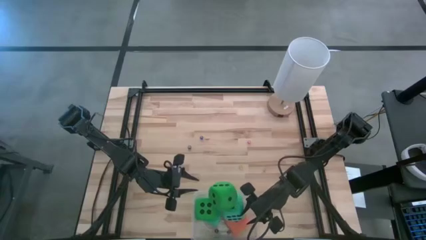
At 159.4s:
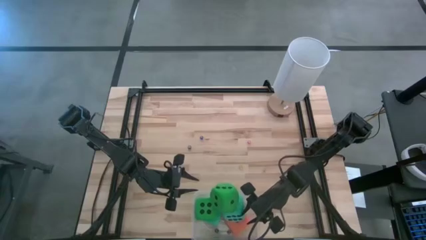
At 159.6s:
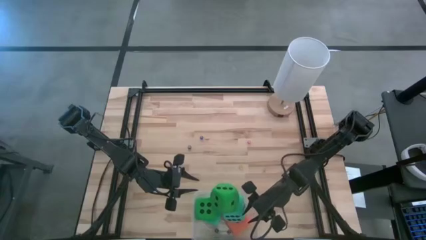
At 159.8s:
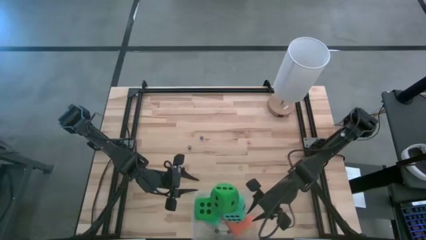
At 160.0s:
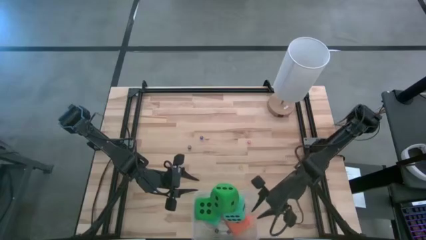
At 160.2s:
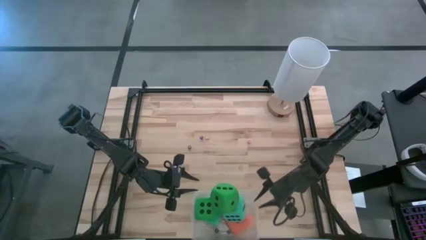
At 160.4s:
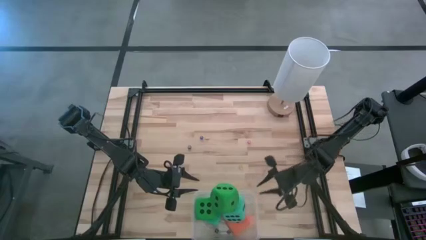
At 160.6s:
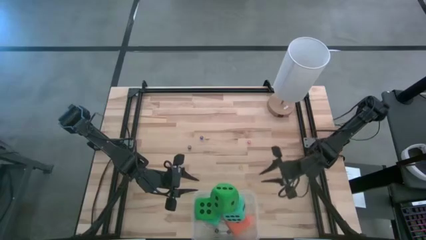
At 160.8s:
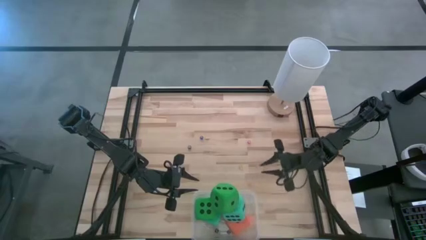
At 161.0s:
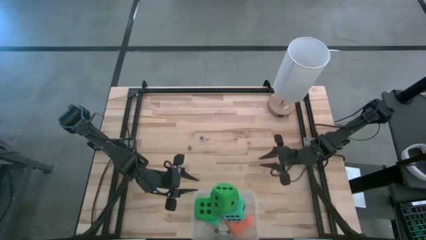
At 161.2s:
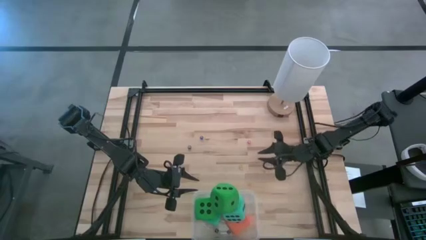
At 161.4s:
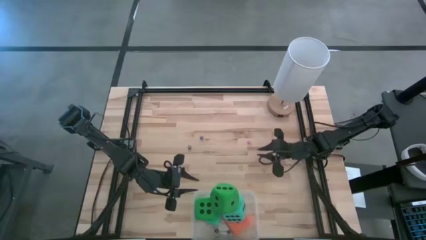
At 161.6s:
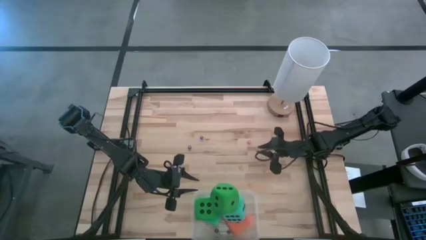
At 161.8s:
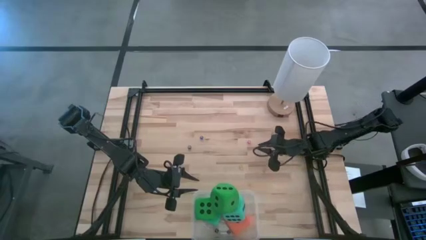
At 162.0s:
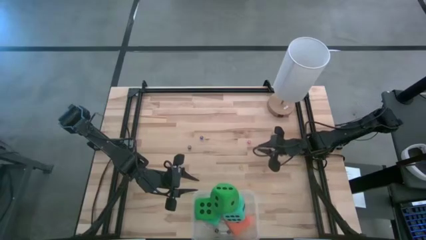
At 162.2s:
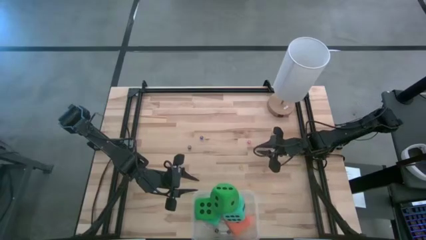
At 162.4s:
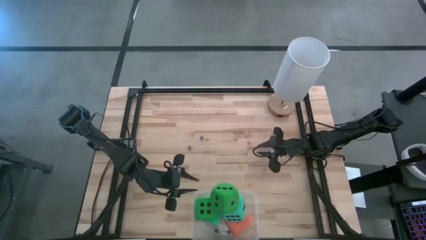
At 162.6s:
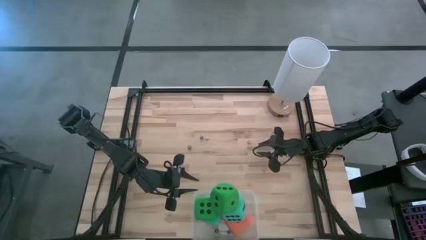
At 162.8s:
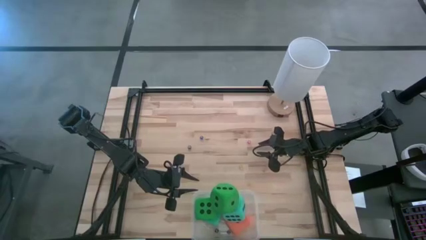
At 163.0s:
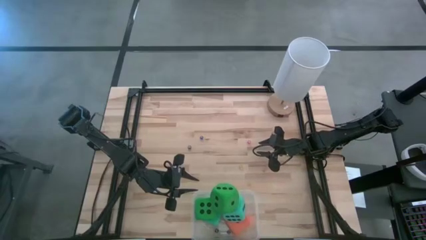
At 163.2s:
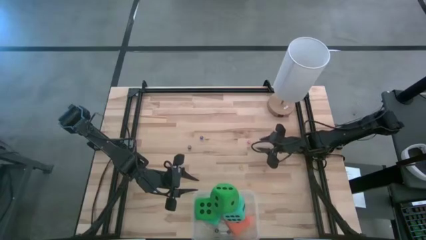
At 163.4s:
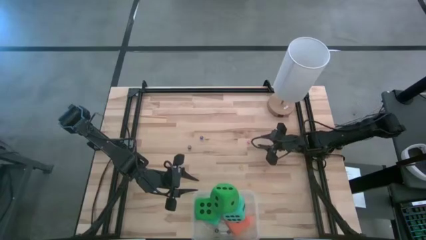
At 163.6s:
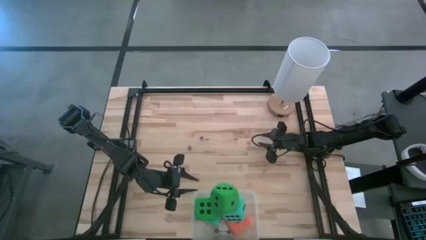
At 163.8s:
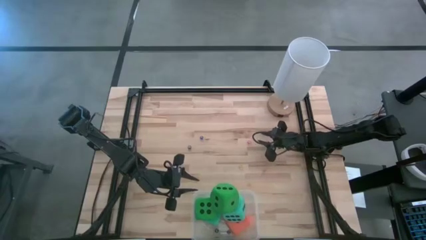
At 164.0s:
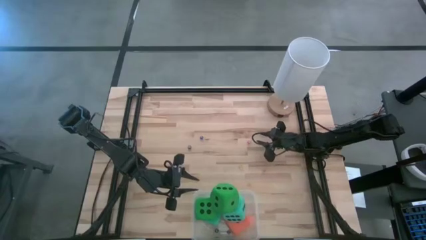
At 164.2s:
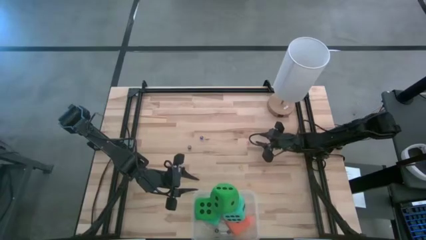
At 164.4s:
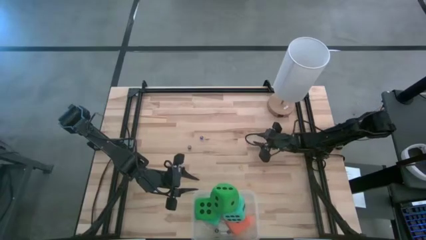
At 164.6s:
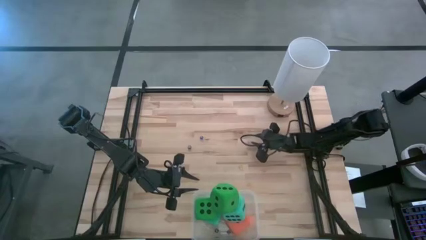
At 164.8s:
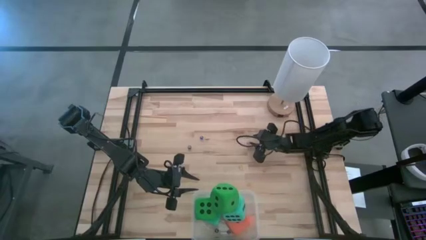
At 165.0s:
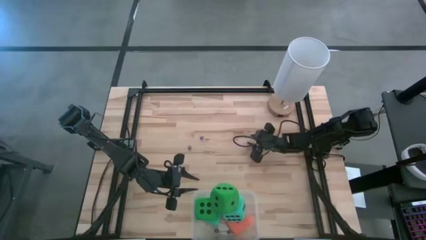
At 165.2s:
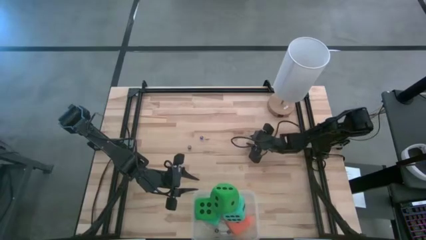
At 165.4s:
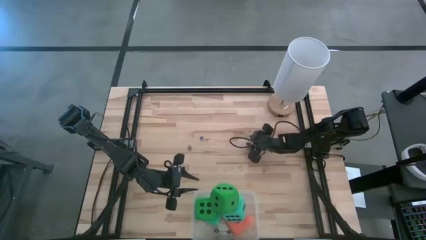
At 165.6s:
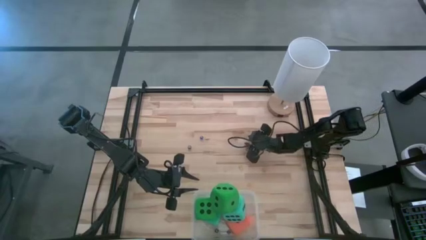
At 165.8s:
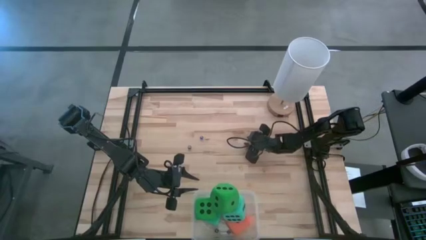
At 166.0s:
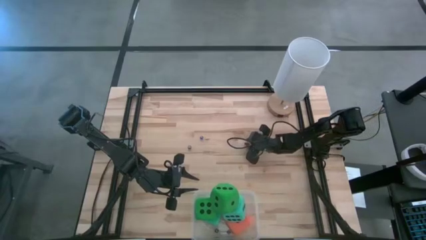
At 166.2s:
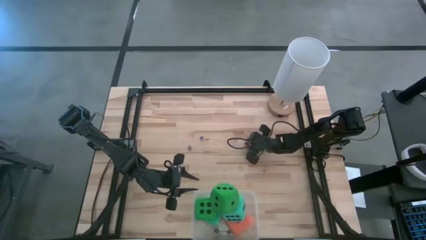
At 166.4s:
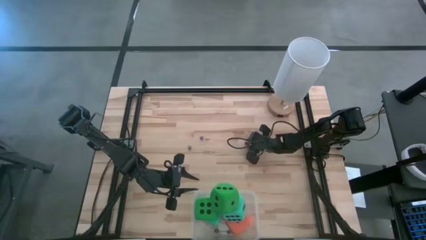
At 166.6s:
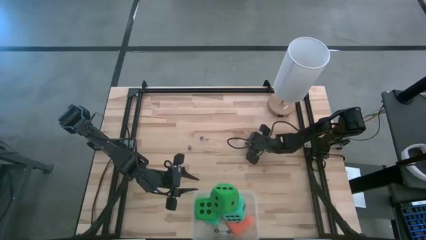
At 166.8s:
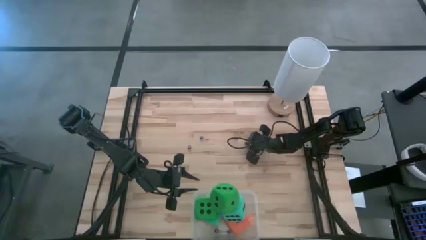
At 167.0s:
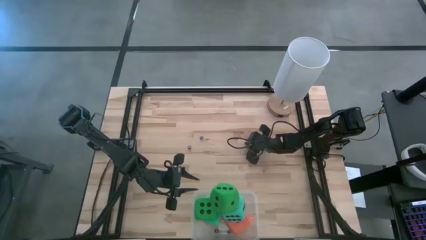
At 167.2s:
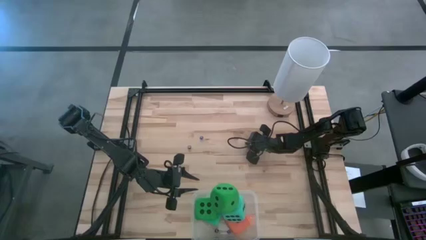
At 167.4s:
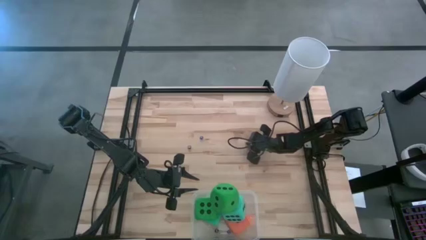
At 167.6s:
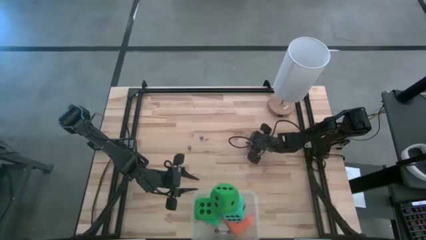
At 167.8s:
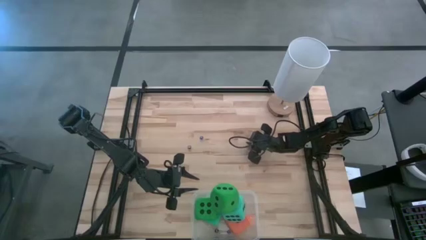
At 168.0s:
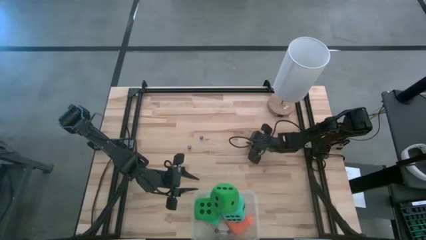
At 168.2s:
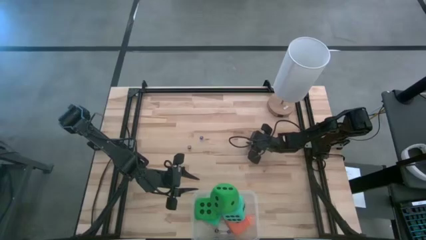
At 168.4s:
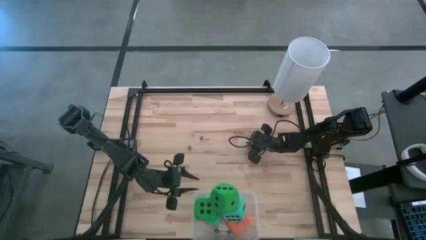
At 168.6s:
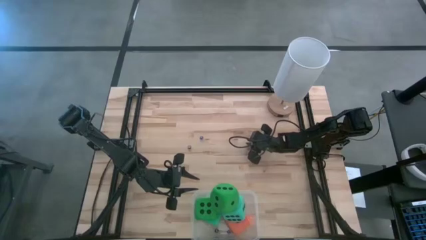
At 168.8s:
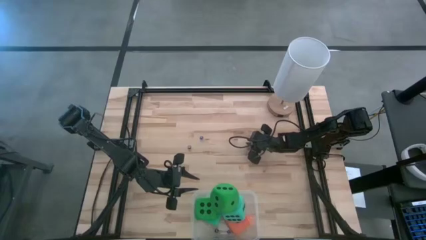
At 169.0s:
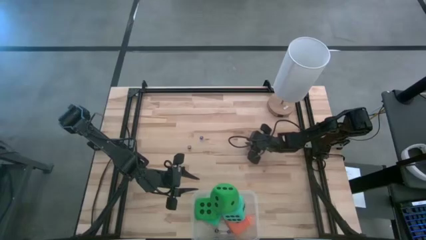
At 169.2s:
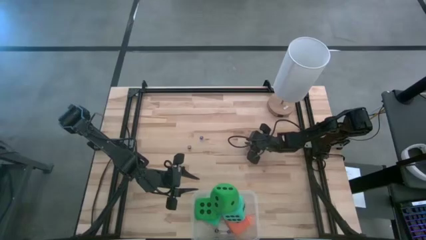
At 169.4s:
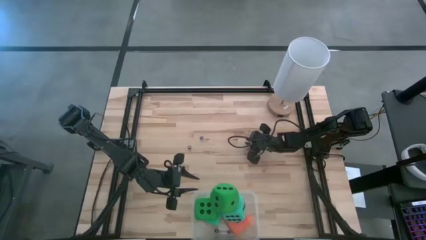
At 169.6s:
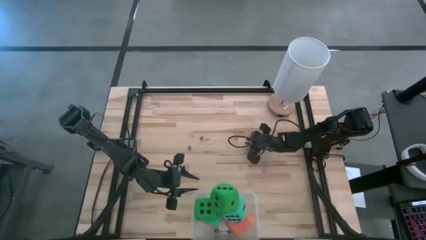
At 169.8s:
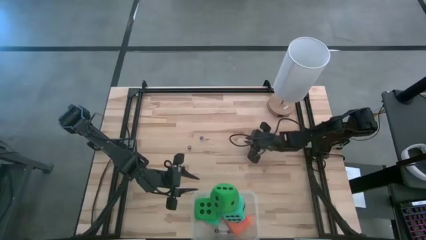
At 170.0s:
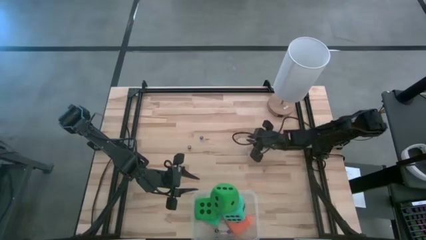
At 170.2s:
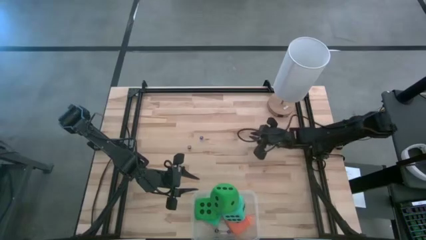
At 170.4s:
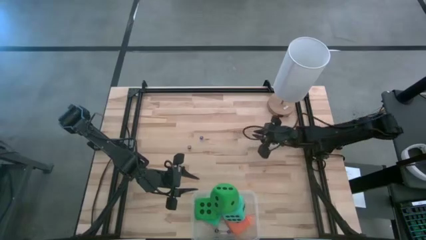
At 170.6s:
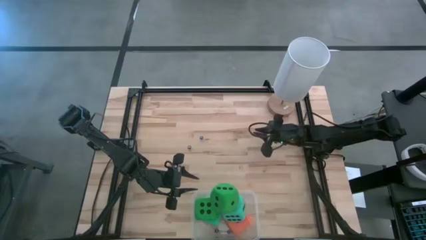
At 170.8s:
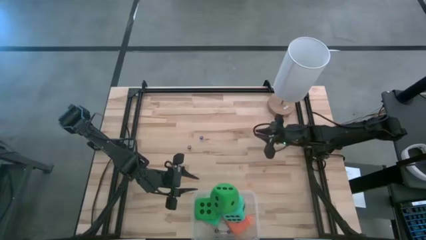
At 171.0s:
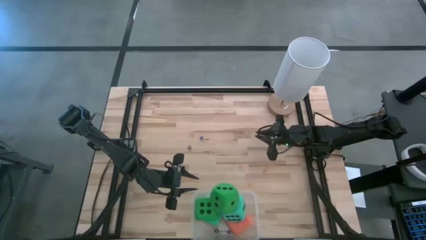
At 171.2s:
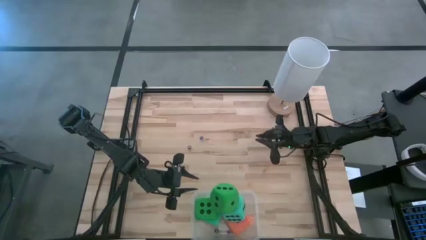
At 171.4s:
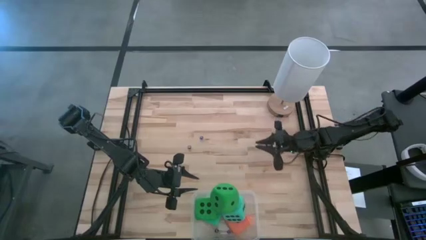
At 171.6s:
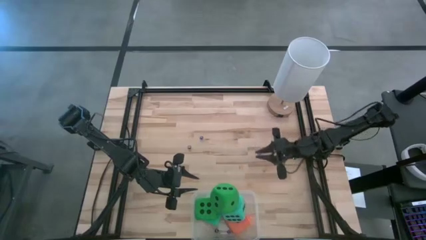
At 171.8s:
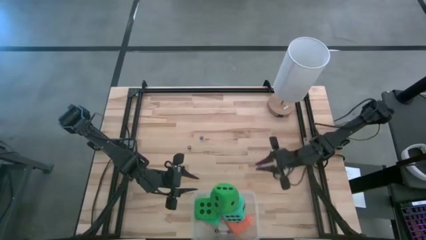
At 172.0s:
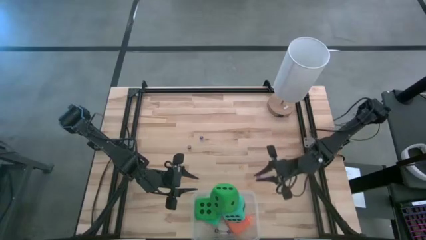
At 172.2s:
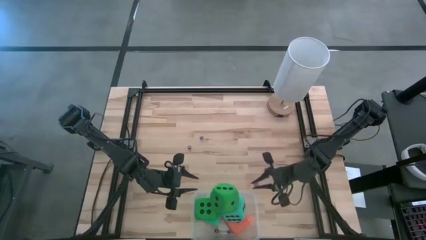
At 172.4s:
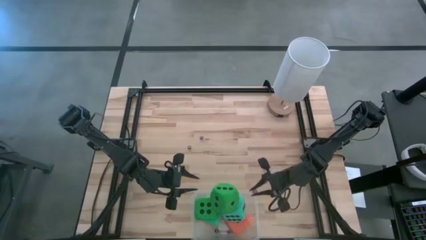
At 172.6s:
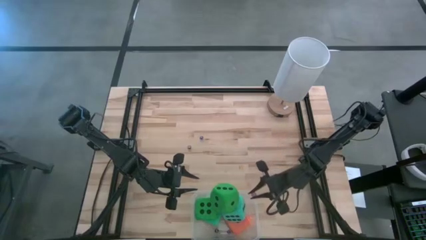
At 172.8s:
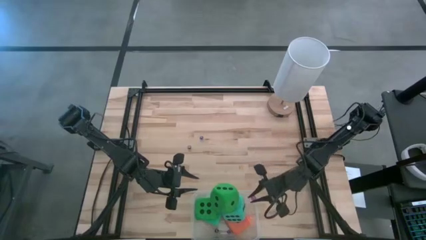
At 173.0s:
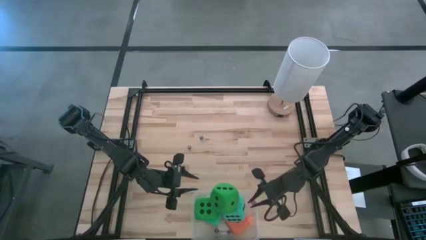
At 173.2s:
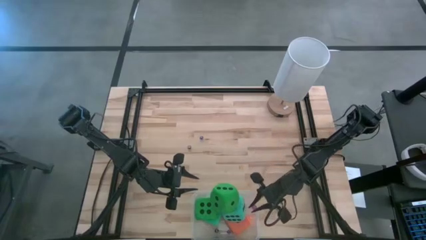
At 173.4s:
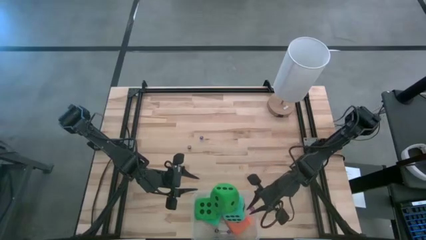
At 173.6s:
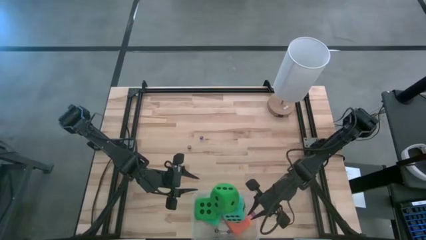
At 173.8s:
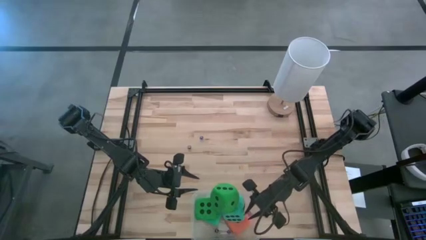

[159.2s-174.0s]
Task: Pick & Place Dice
Put the small red dice into the transparent bin

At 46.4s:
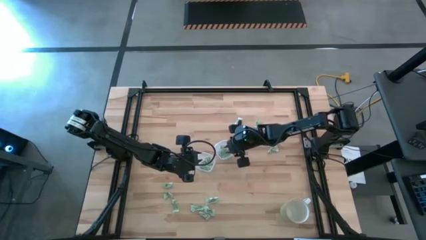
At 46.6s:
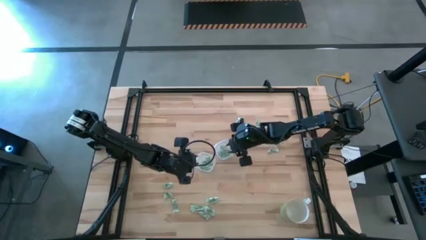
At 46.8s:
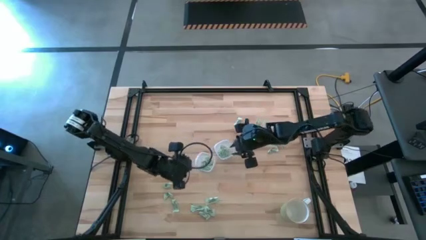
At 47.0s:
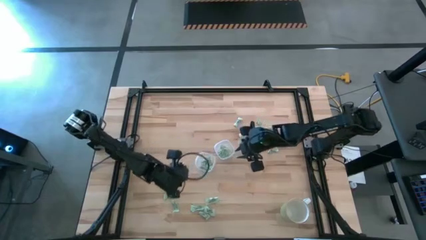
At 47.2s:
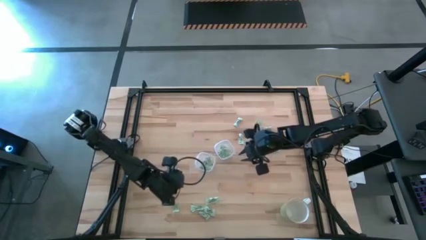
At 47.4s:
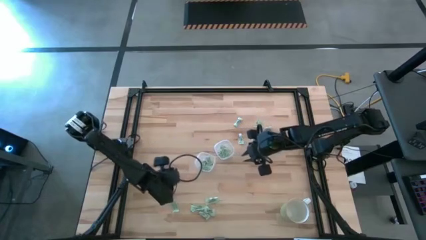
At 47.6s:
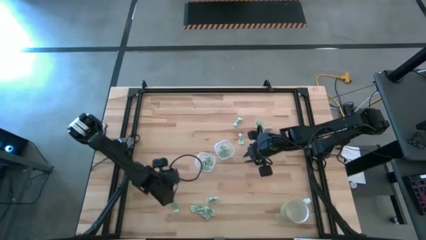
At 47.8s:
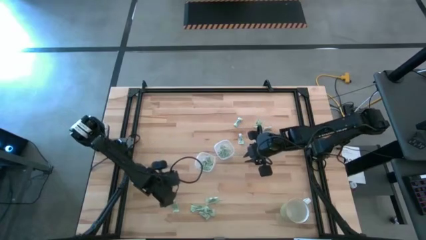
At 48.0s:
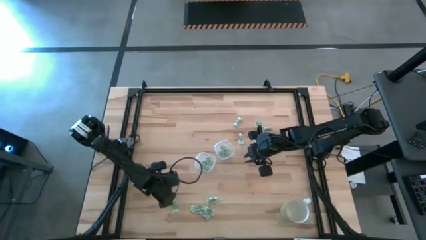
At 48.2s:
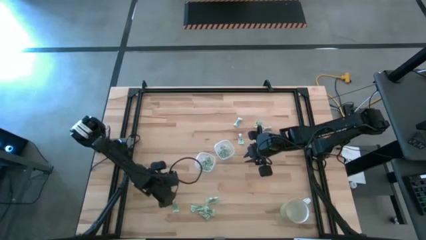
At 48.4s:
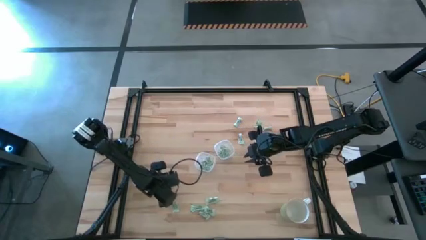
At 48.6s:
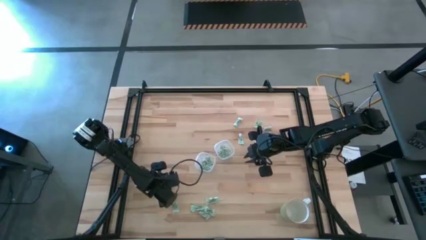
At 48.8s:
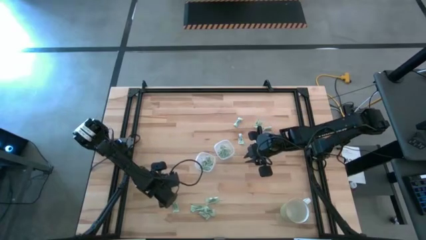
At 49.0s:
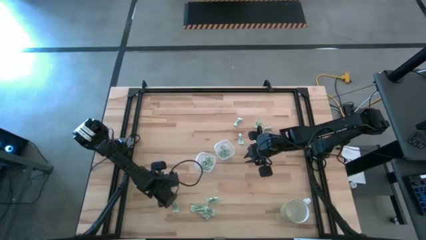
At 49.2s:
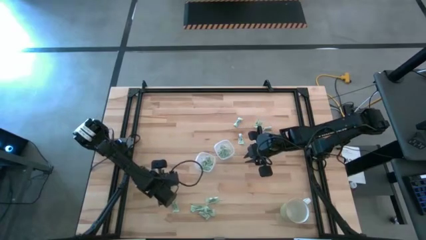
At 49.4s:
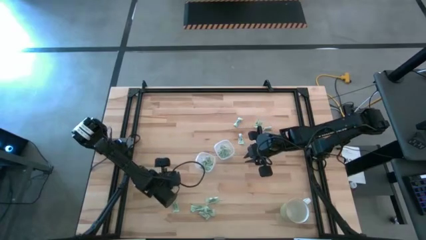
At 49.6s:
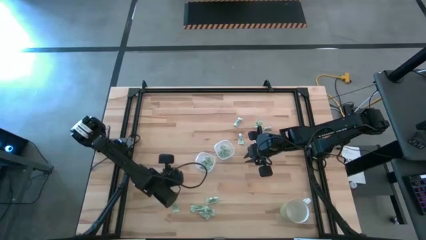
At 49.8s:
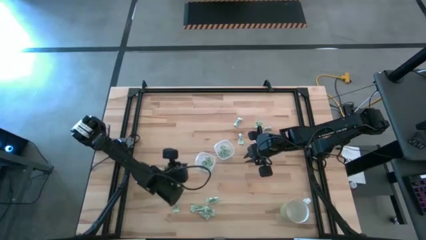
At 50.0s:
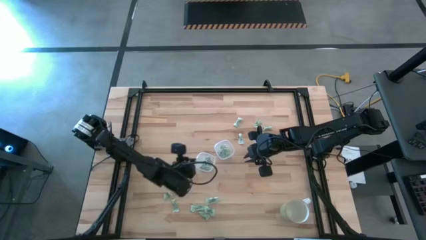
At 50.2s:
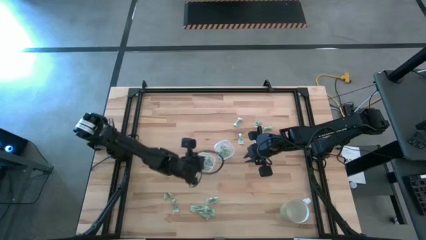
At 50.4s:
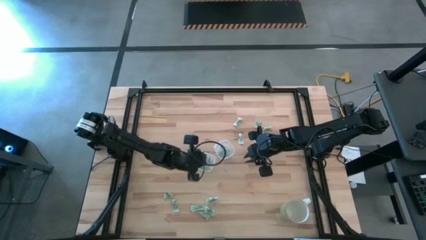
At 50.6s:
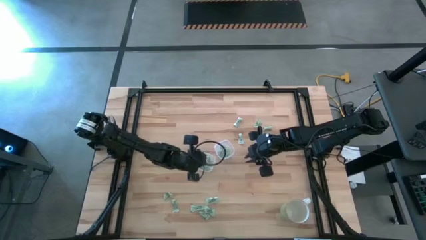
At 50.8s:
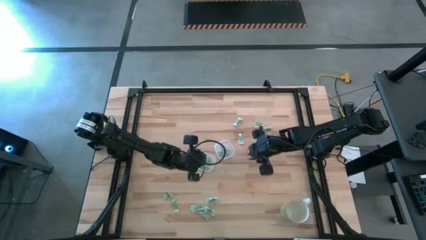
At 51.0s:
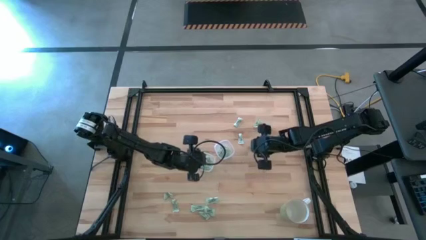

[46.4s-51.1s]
Task: Pick and place items into bin
Put the stevia packet into the left bin
